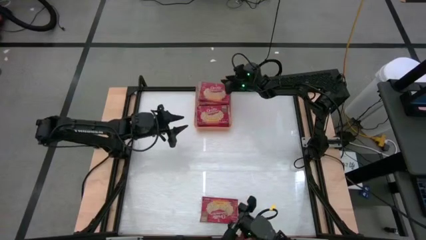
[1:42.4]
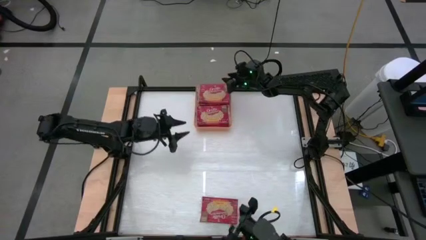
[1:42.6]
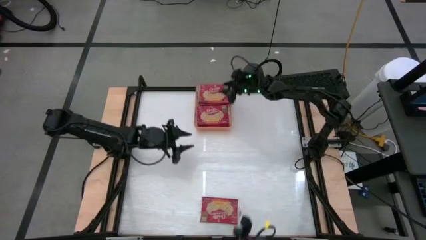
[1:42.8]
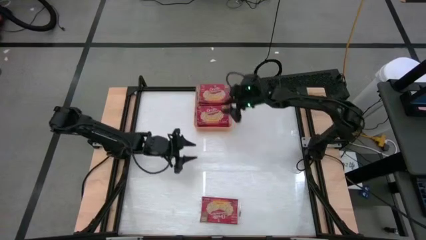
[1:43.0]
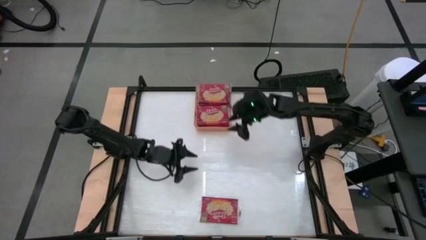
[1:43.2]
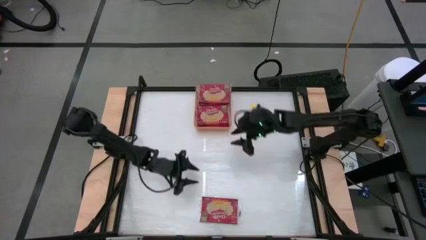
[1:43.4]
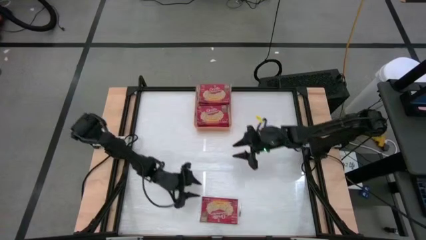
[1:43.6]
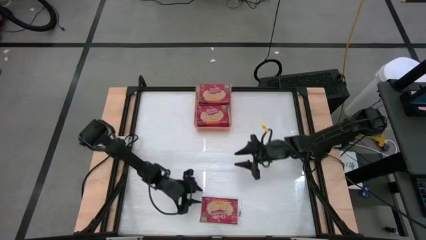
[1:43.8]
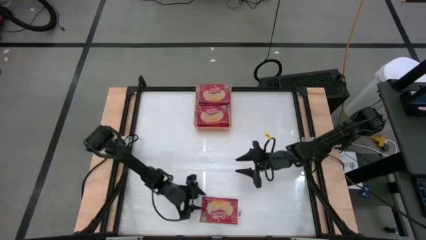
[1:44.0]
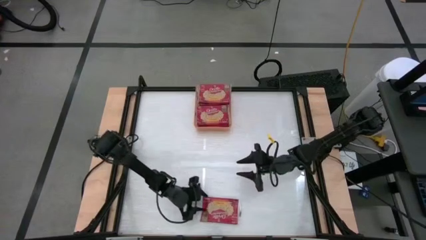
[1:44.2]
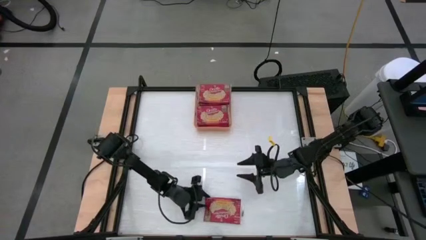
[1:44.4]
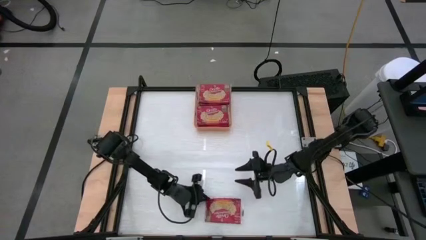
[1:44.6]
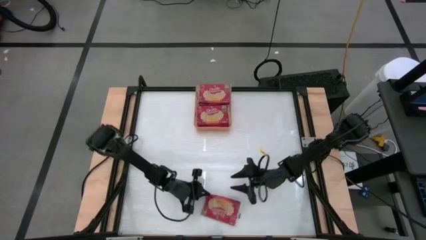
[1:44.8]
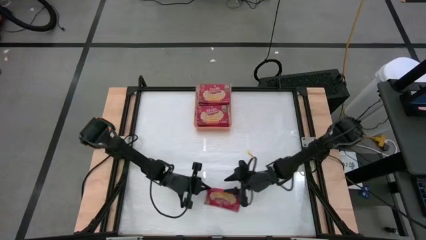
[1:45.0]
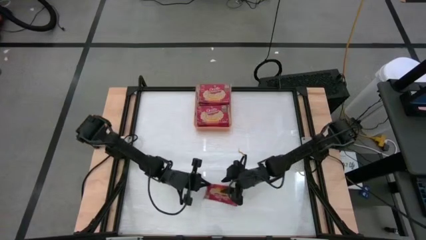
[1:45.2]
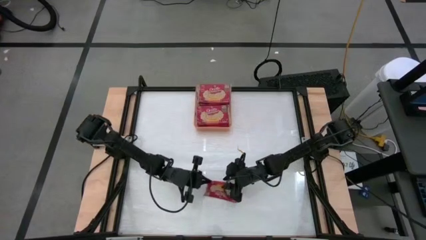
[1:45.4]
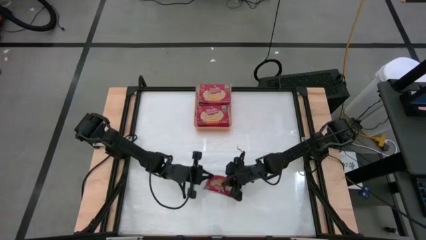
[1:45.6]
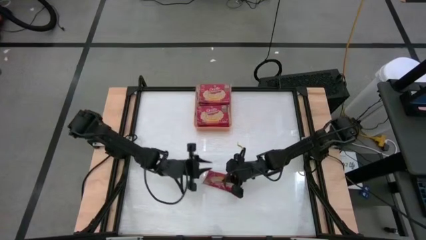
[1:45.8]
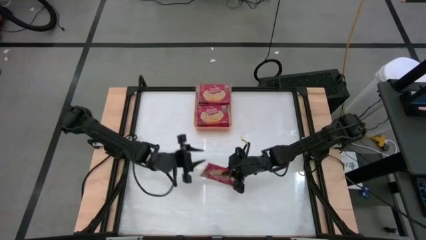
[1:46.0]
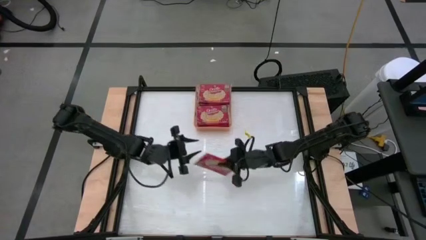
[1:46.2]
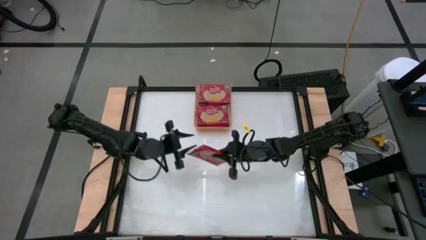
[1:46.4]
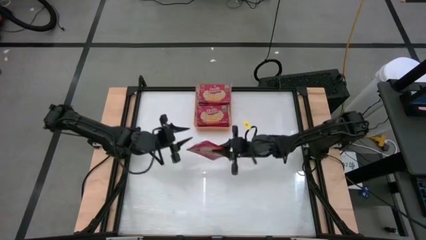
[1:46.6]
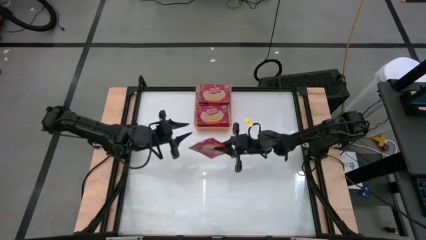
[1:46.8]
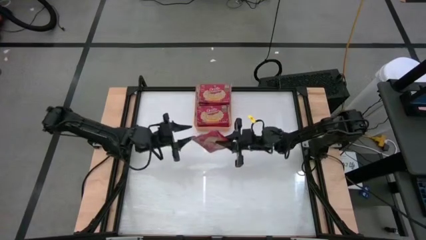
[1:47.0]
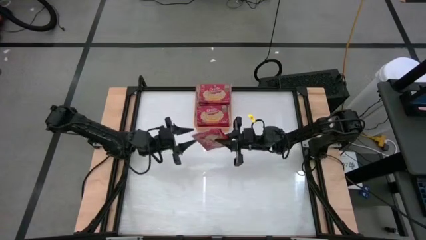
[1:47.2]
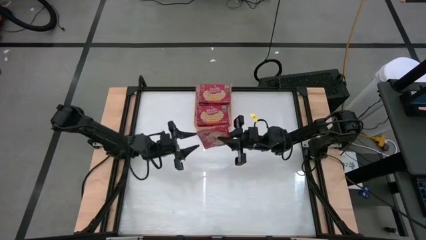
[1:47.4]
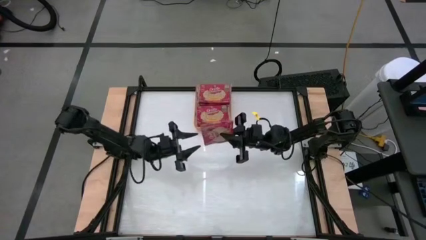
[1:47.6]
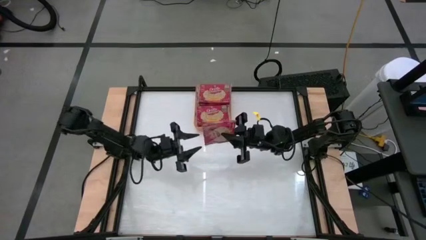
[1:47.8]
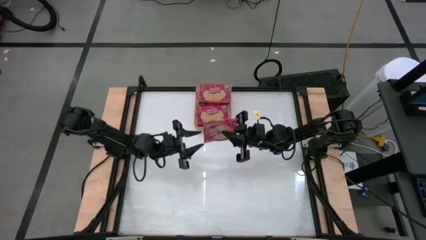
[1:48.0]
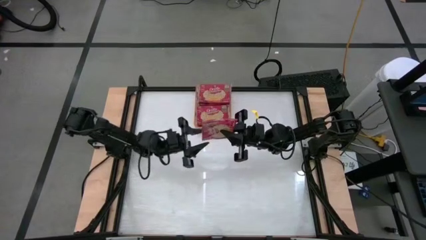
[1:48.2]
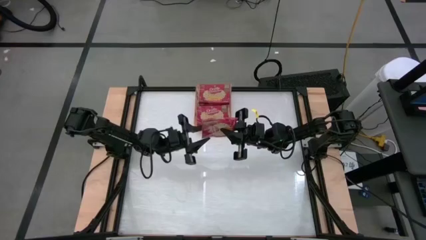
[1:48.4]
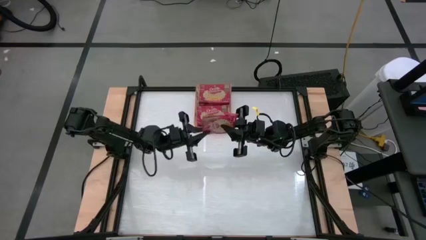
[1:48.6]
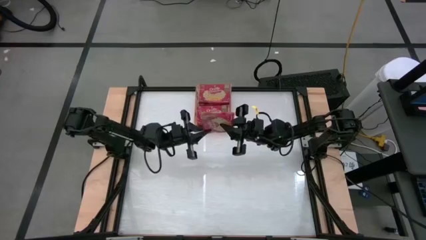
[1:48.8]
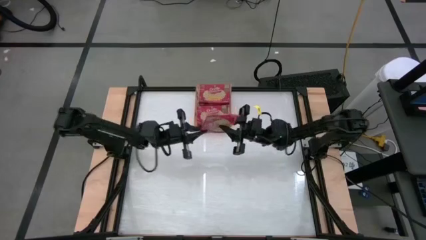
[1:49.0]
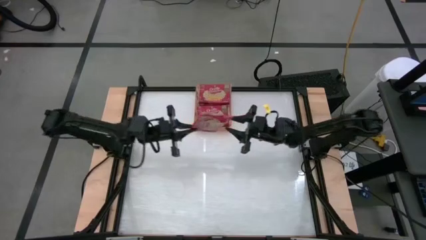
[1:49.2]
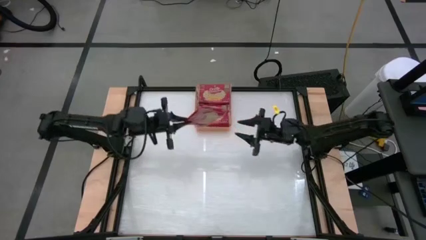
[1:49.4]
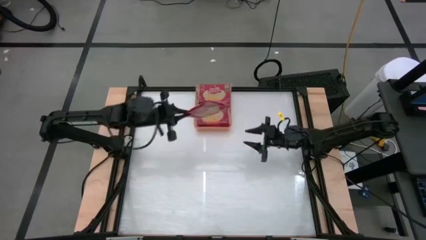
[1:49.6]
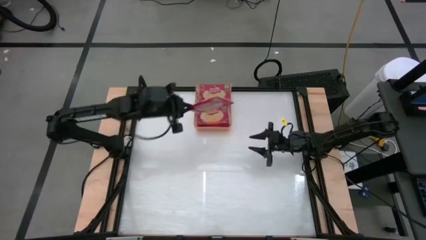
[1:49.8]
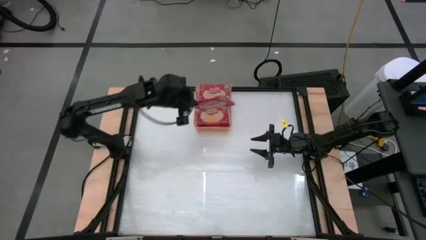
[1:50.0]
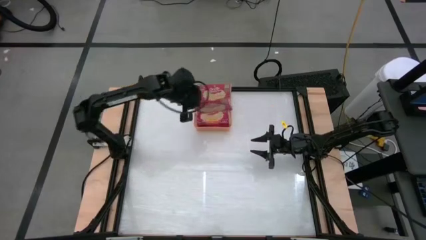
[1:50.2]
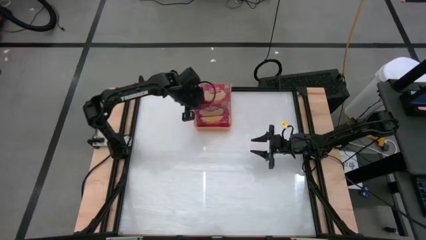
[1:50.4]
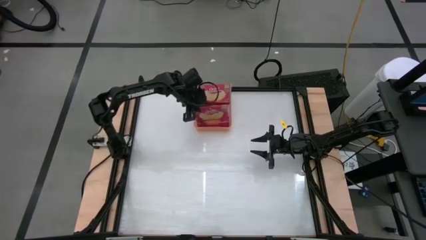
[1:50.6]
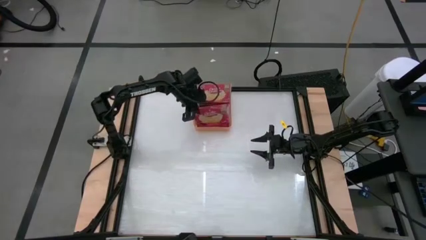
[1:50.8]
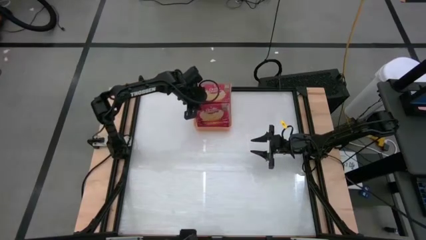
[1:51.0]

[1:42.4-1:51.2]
Task: Sort popcorn bags into baskets
Put the red popcorn bag into the orange bin

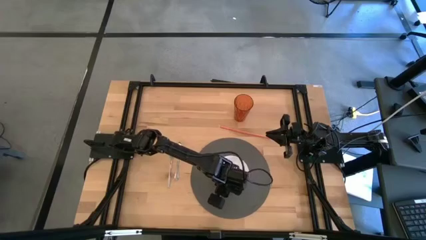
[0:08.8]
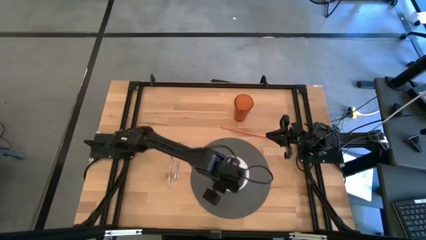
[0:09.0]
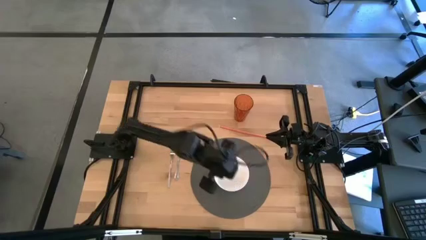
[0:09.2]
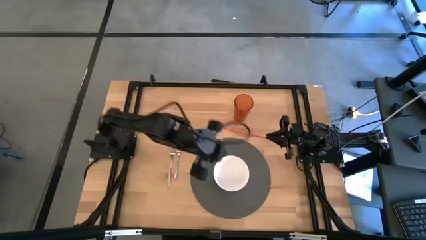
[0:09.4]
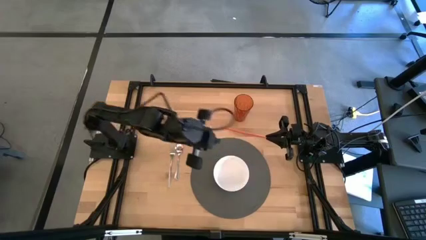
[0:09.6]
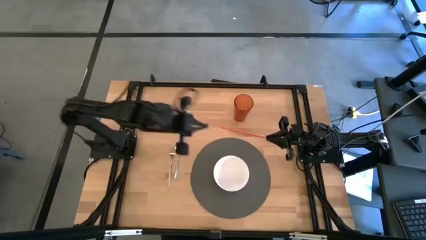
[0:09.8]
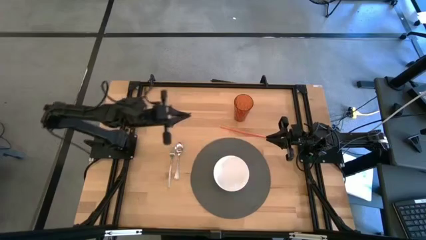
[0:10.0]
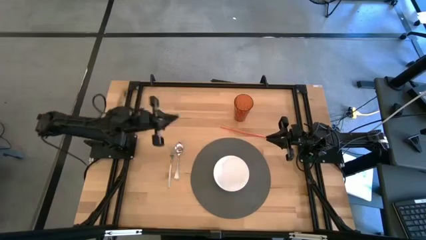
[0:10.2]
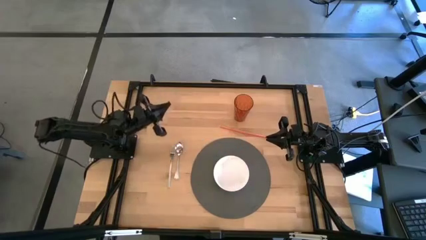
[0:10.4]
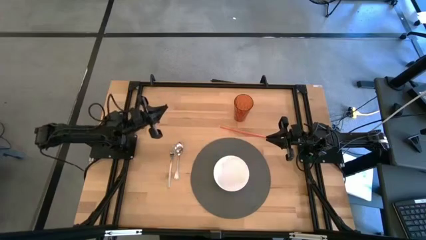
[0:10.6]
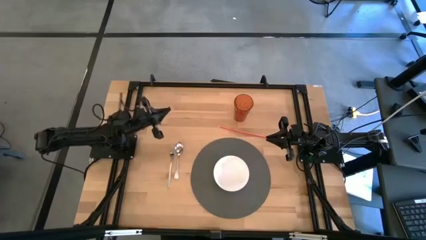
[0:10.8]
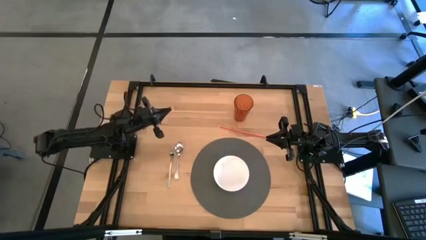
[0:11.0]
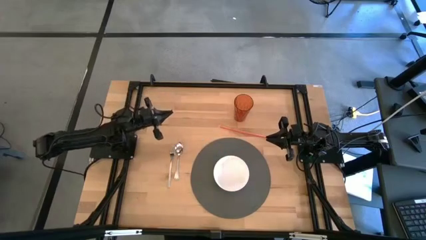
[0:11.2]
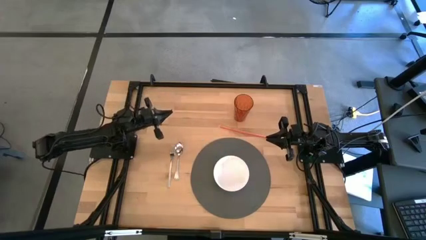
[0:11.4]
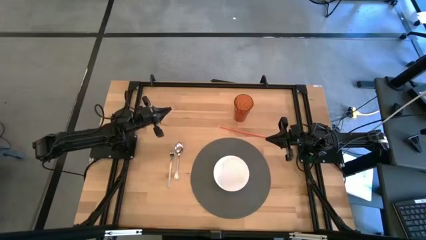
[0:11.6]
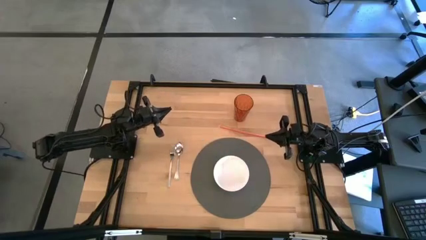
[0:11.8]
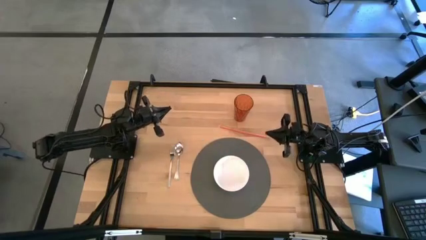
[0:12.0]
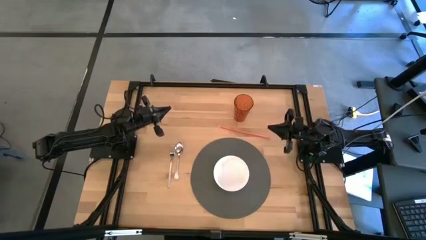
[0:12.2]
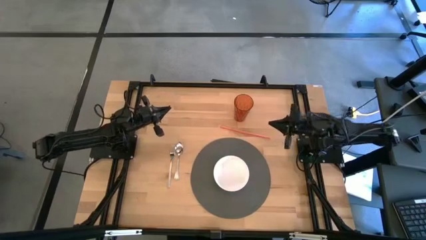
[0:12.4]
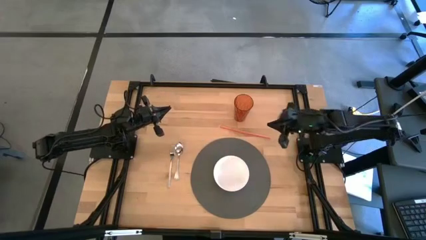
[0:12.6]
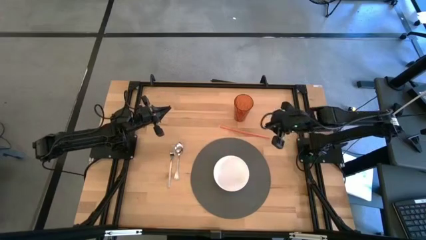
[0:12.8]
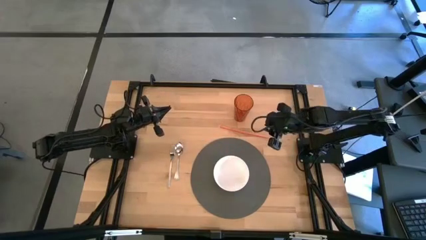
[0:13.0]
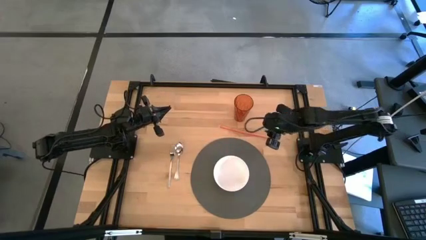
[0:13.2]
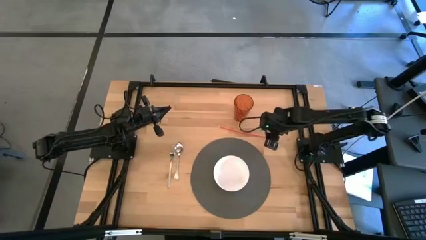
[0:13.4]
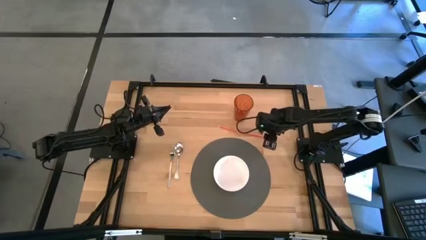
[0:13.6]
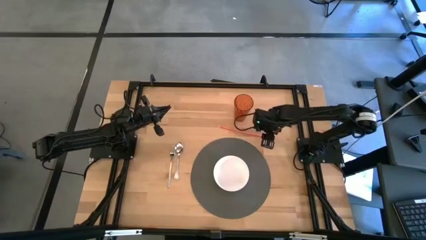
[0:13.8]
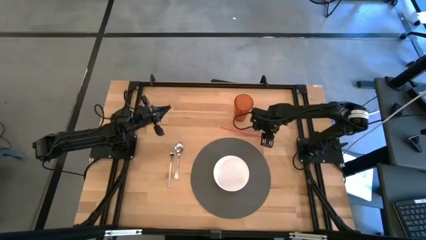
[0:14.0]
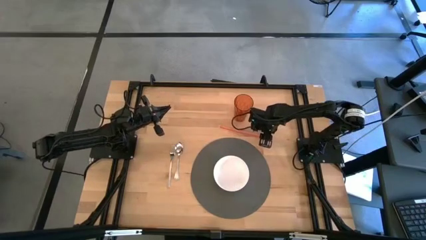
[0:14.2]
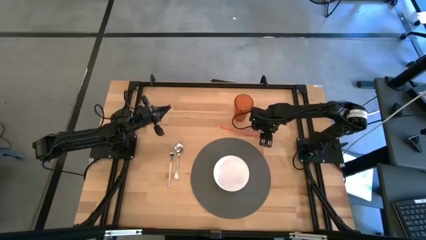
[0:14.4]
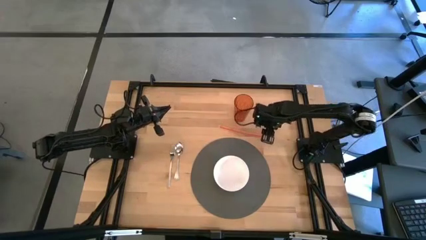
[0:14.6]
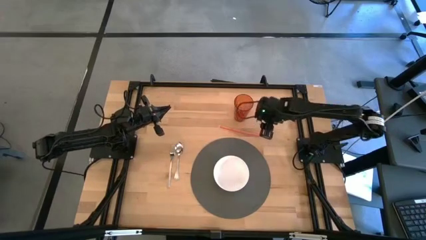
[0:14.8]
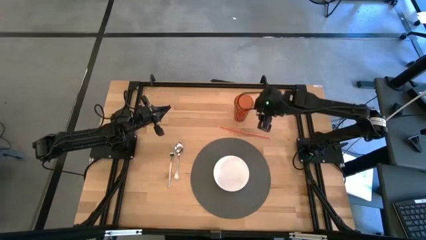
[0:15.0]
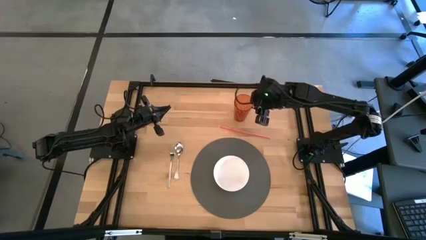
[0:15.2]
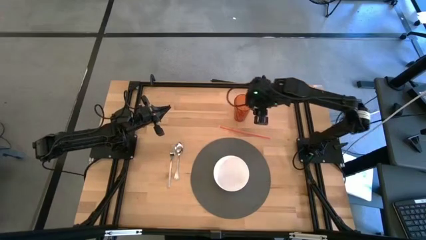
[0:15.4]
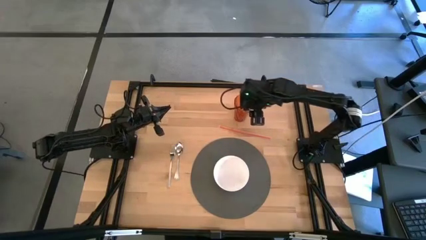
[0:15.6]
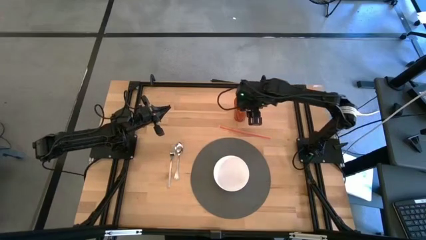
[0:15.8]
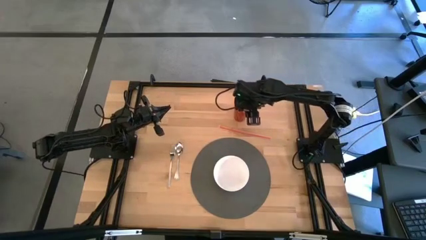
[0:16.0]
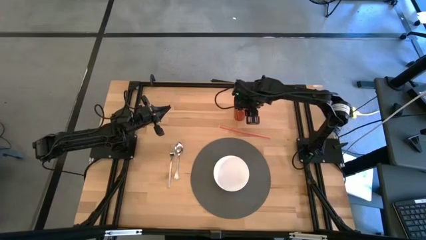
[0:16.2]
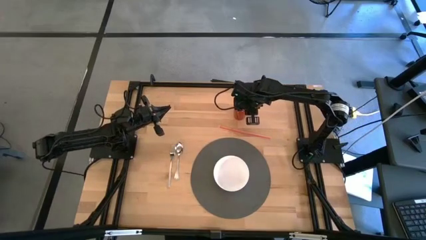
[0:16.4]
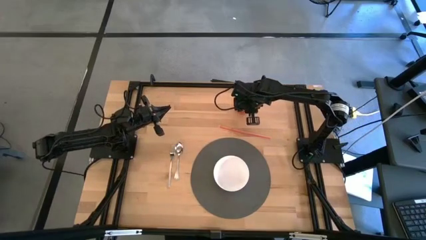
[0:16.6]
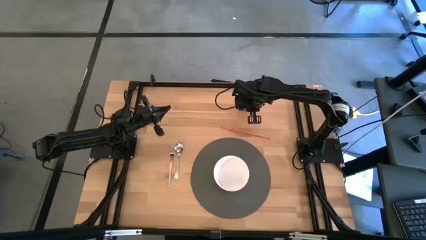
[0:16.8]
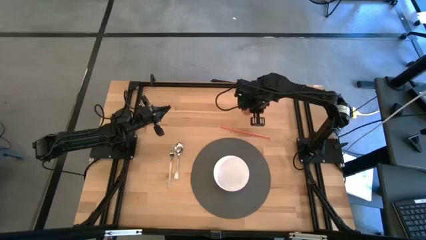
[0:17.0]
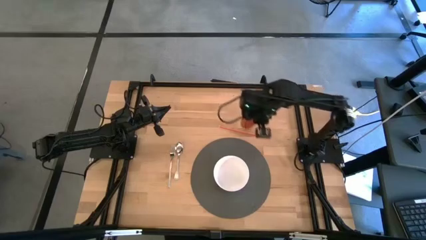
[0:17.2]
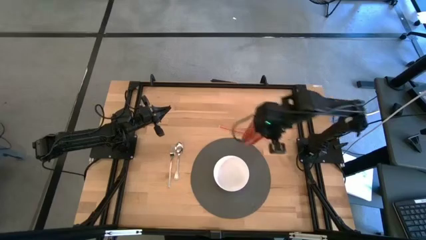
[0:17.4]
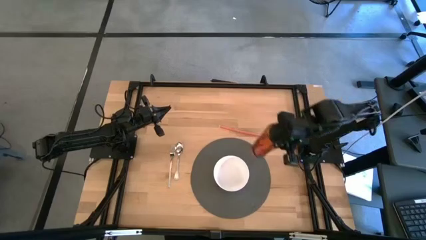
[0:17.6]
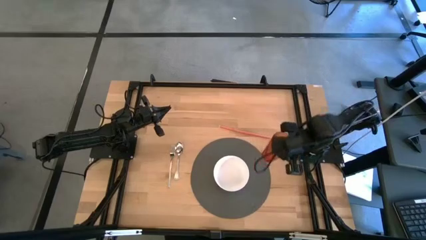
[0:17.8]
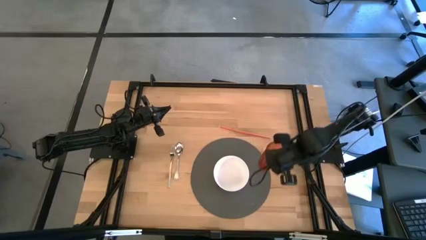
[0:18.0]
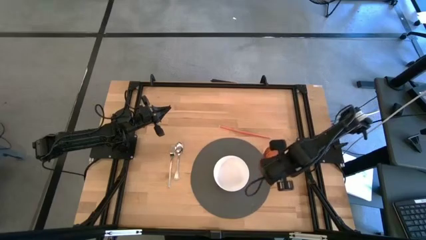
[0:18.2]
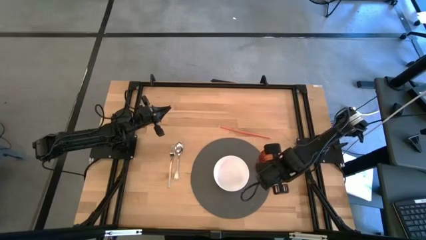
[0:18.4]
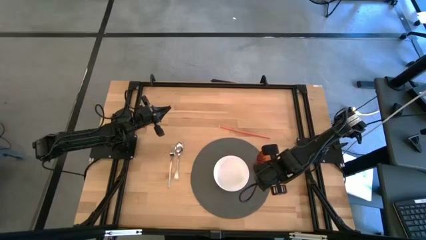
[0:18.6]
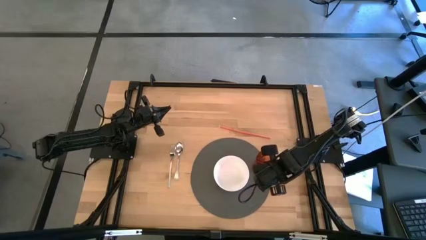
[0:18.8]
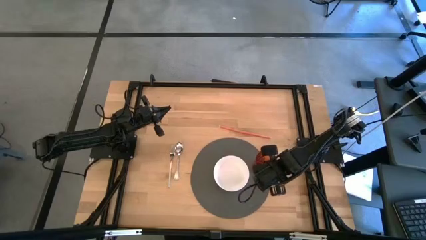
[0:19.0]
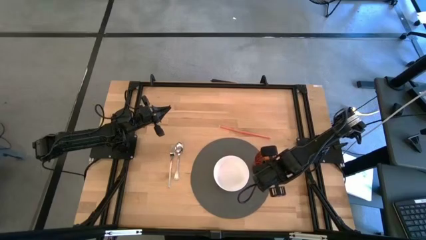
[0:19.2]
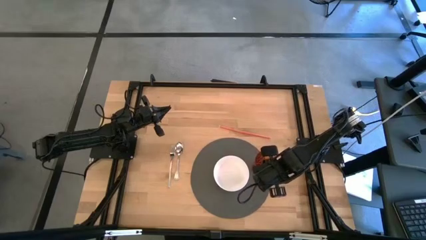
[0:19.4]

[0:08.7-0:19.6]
Task: Pick & Place Utensil
Put the orange cup on the gray mat to the right of the white bowl
